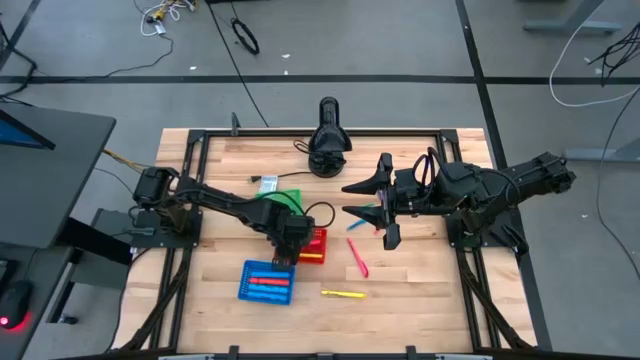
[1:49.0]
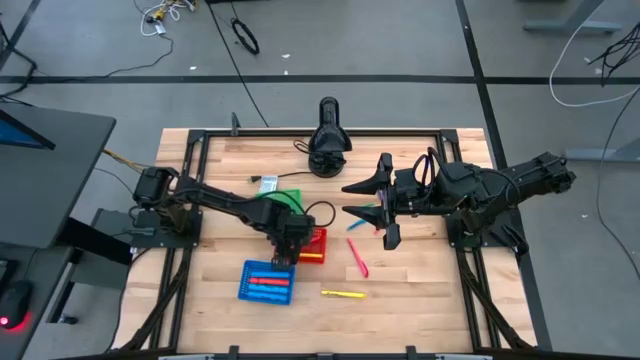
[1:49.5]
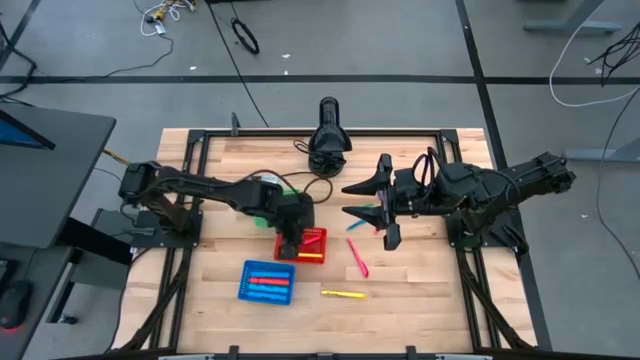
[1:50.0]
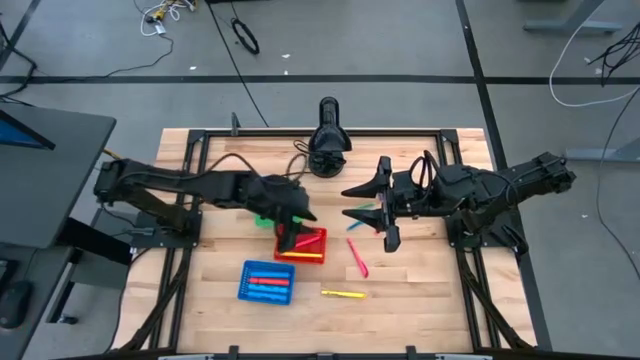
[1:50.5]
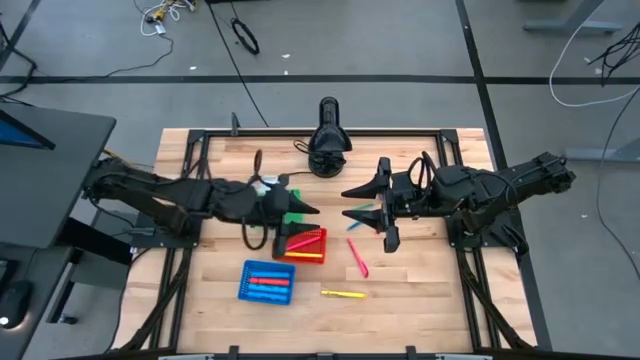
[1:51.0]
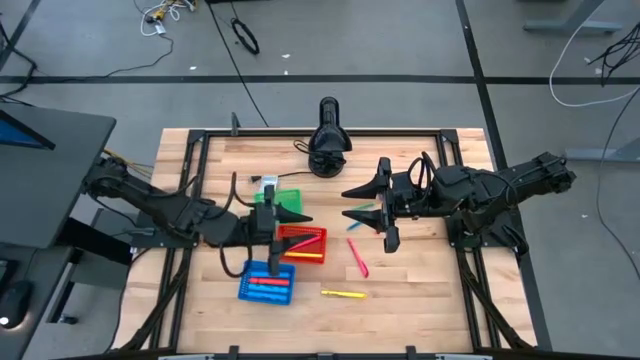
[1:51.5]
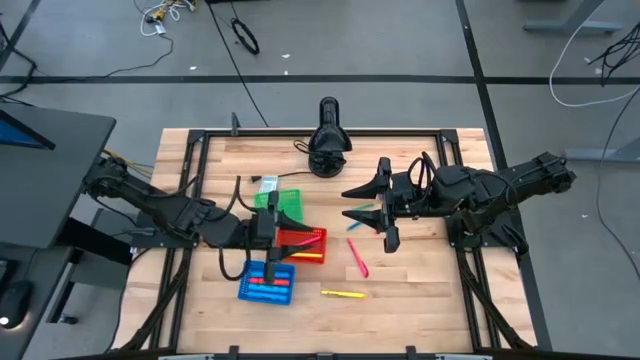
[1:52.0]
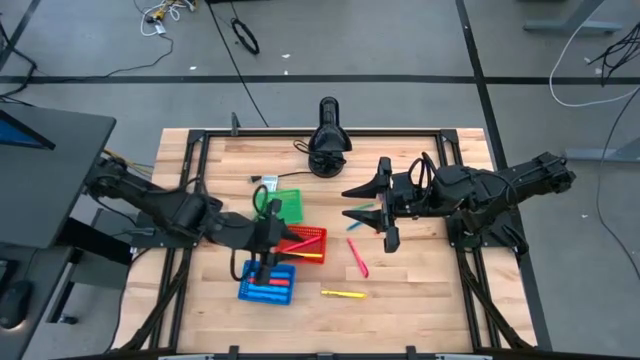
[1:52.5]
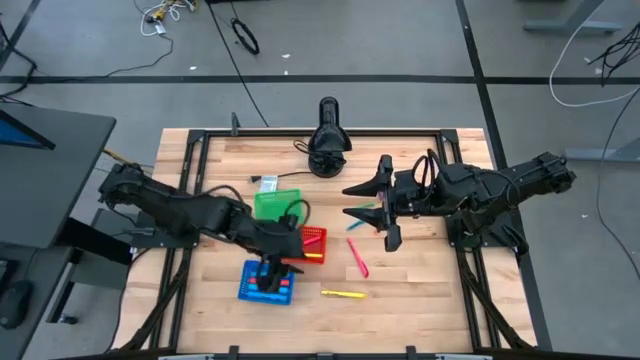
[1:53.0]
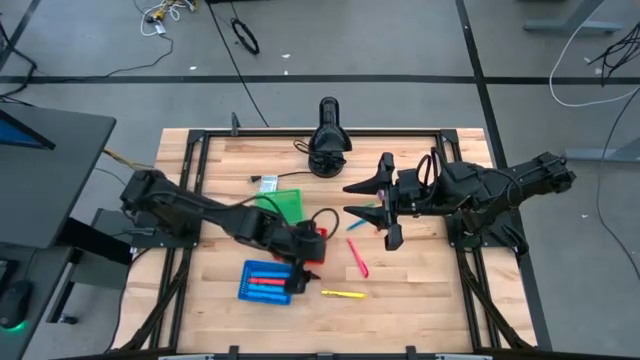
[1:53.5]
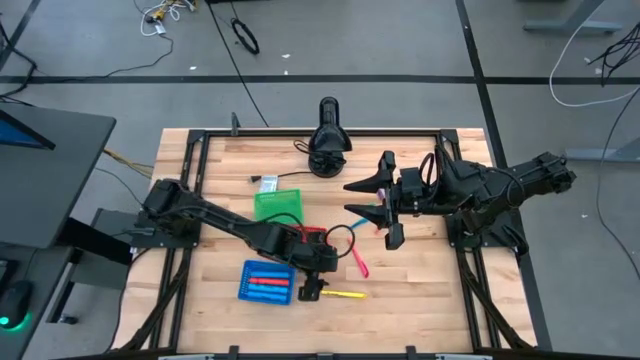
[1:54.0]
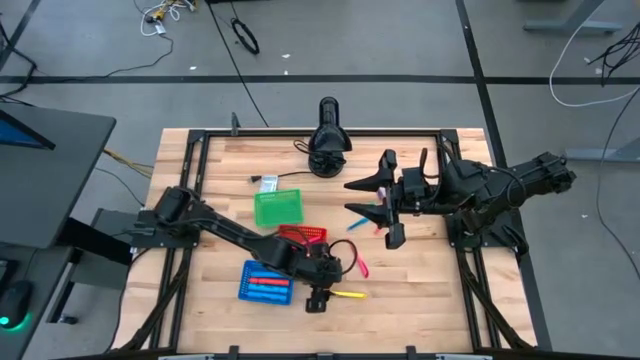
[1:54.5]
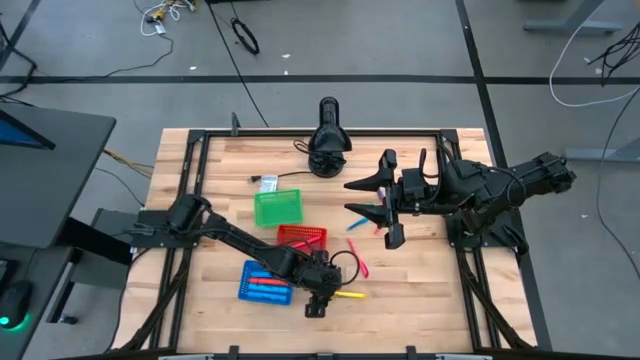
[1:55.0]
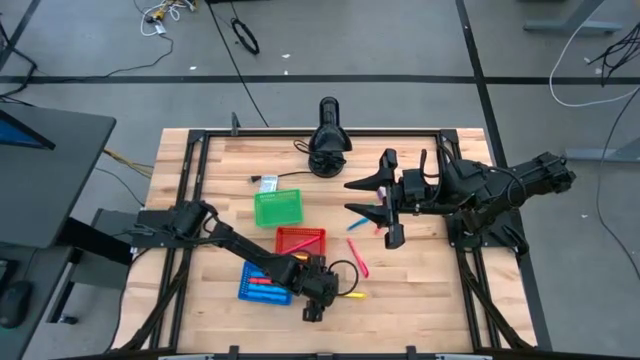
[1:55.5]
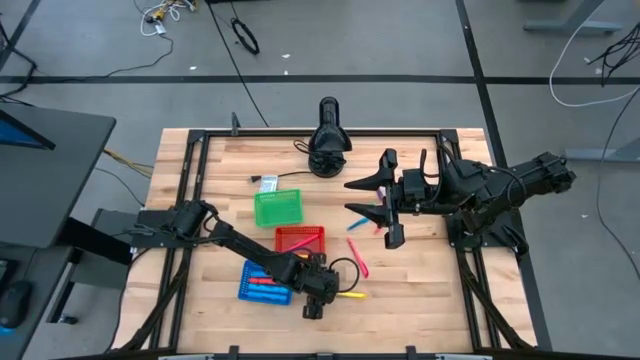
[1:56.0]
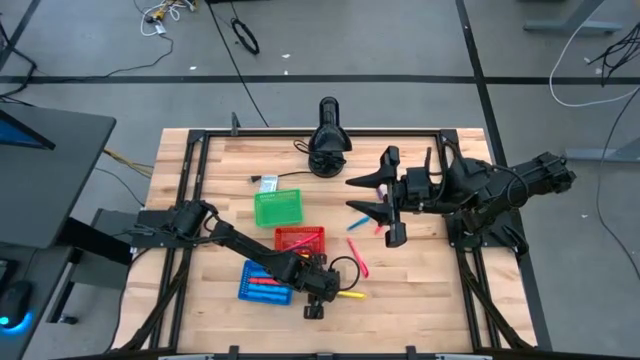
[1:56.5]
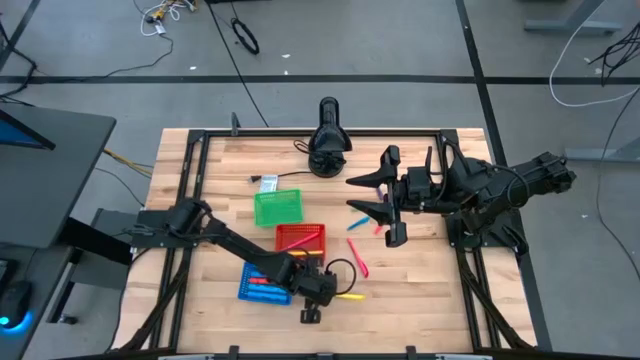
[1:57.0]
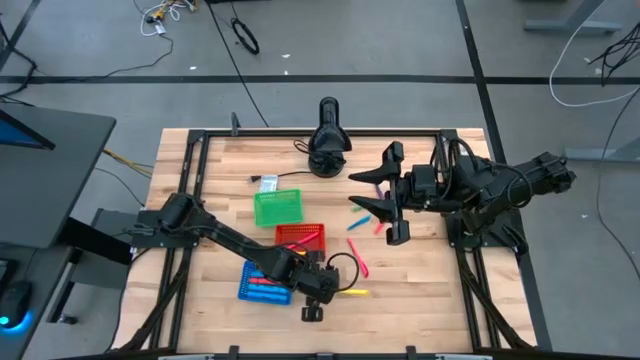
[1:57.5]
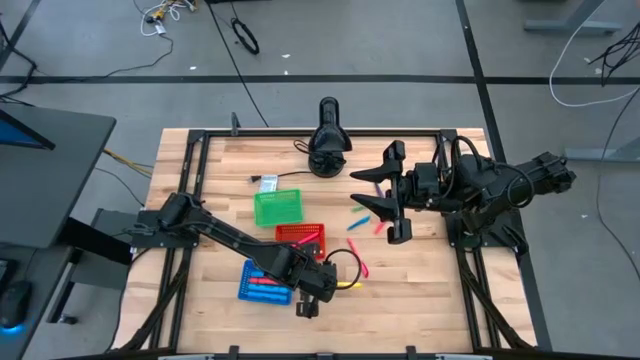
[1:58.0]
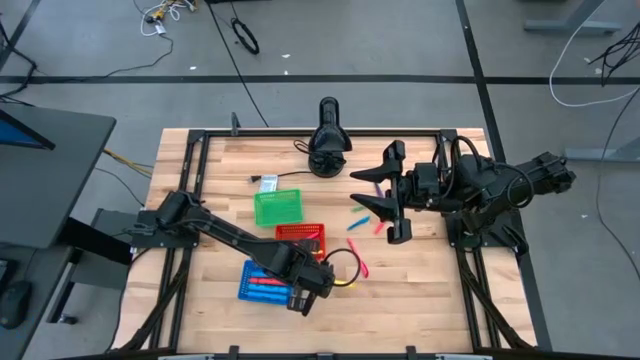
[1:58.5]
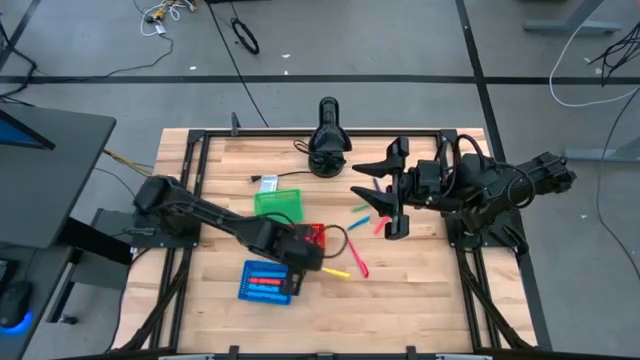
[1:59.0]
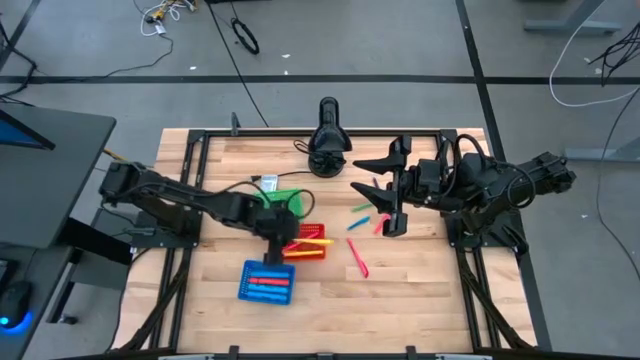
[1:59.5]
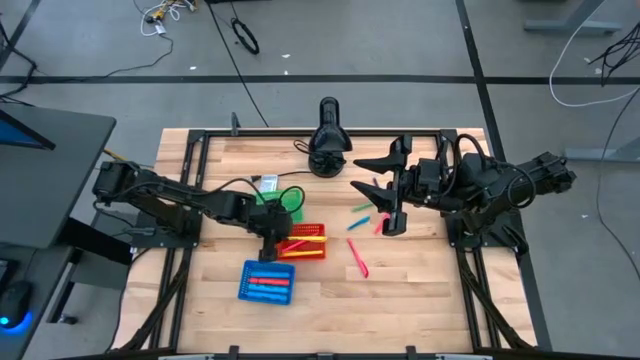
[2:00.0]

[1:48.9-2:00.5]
Task: Pick & Place Markers
Put the yellow marker pen into the red bin

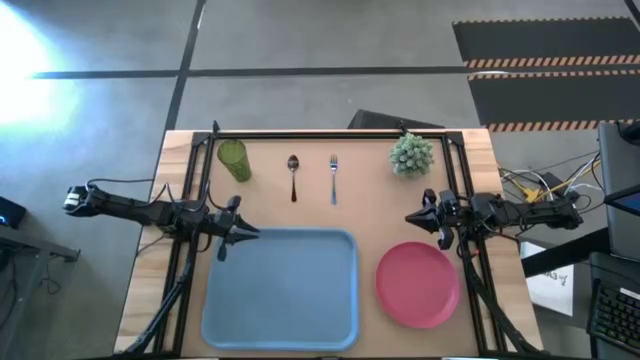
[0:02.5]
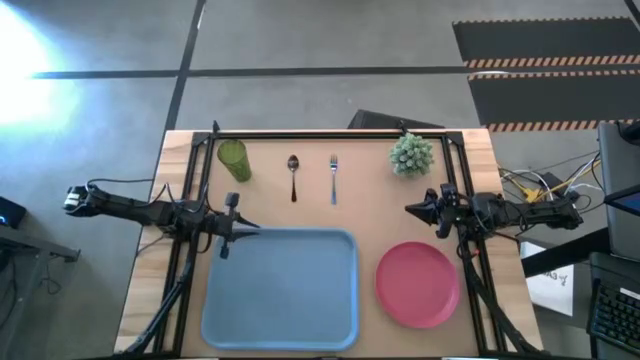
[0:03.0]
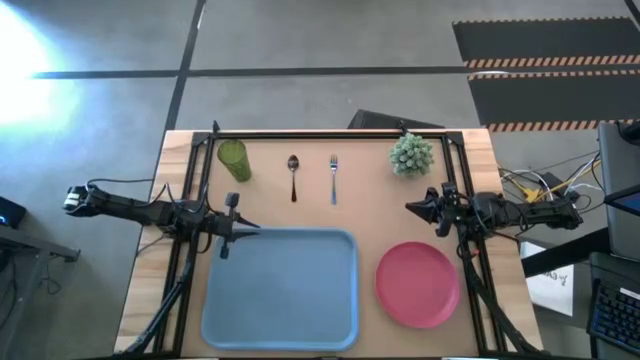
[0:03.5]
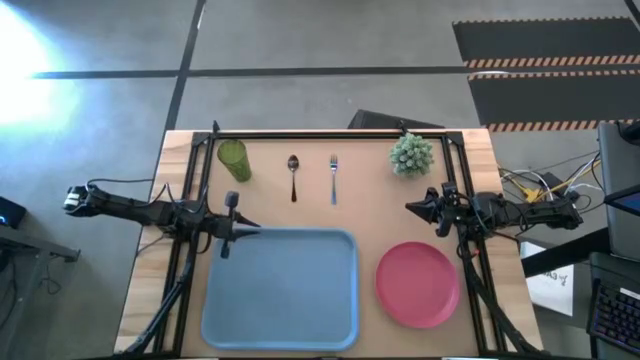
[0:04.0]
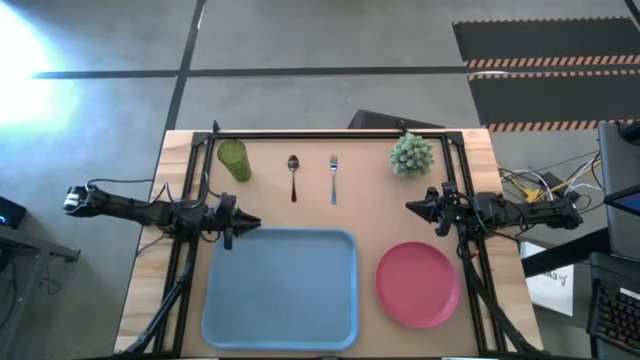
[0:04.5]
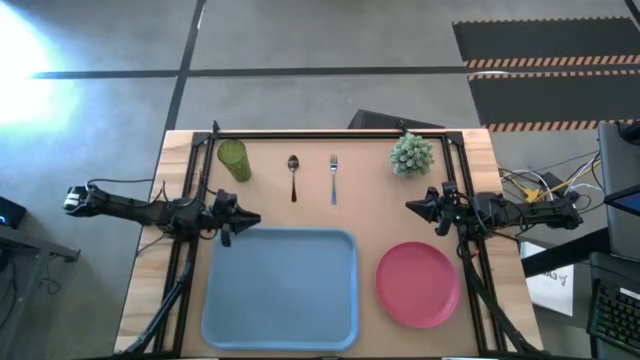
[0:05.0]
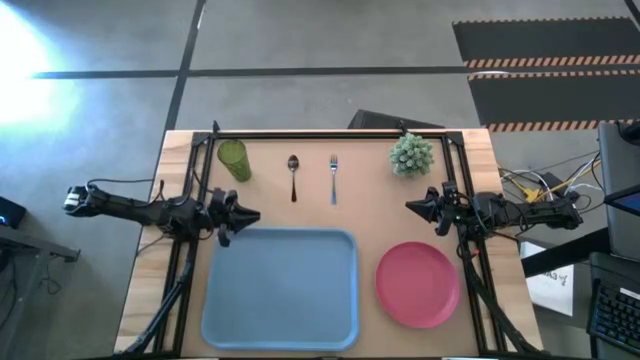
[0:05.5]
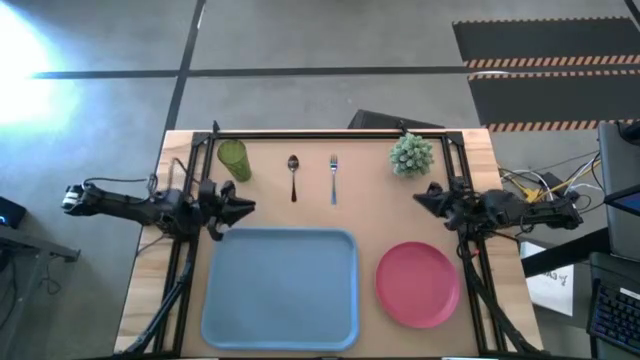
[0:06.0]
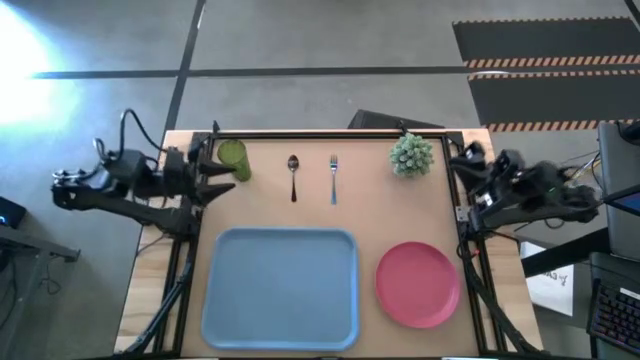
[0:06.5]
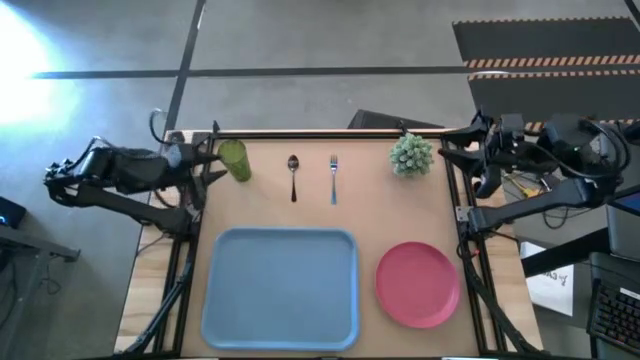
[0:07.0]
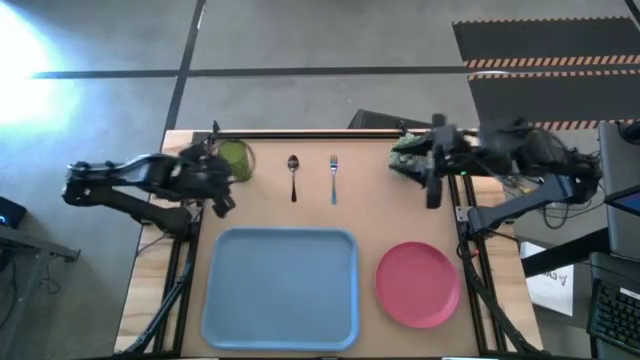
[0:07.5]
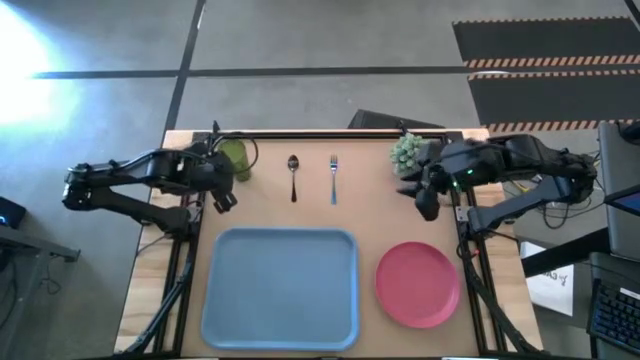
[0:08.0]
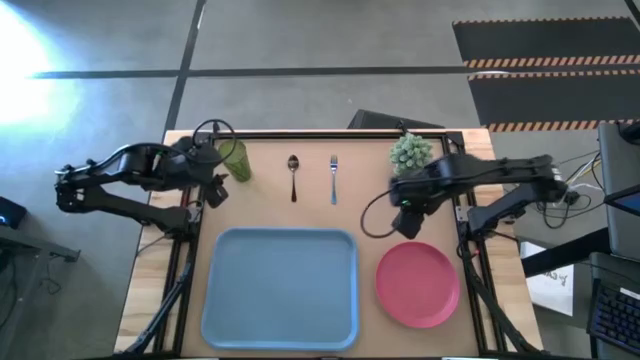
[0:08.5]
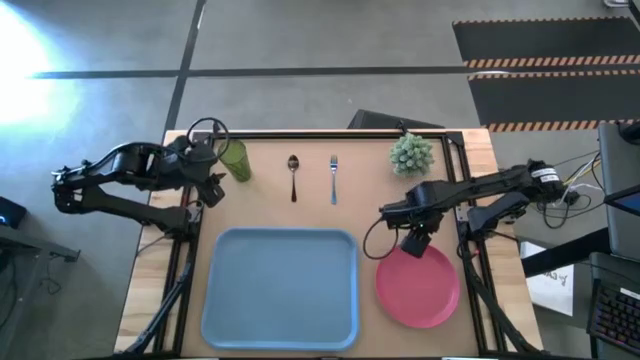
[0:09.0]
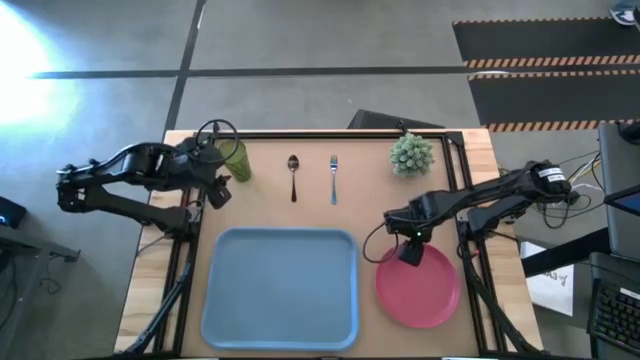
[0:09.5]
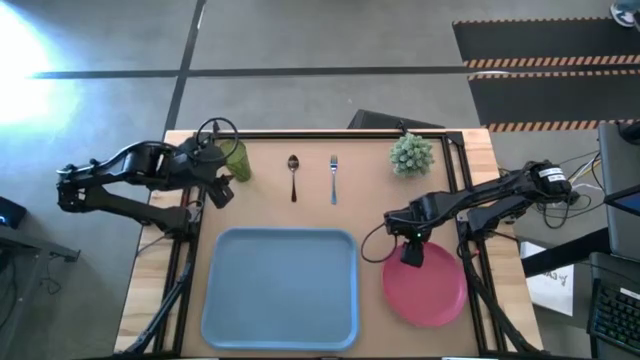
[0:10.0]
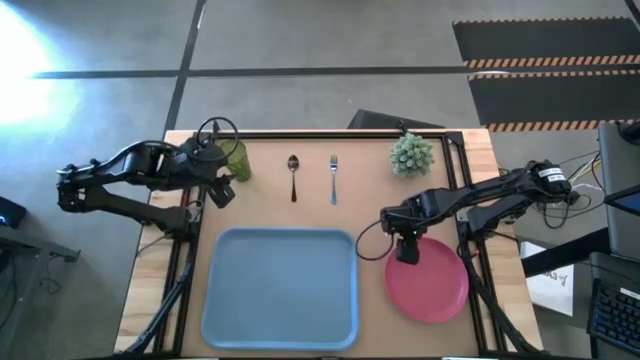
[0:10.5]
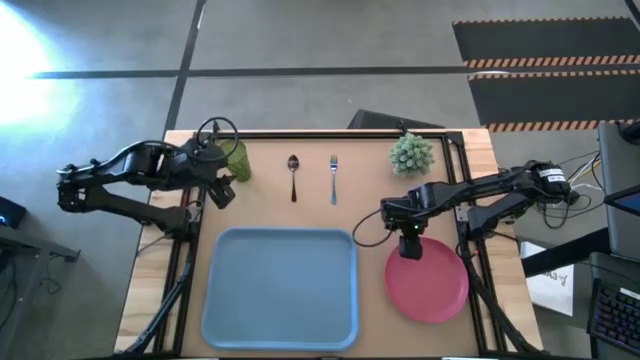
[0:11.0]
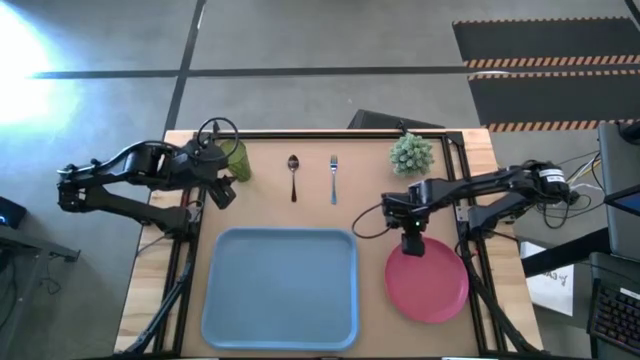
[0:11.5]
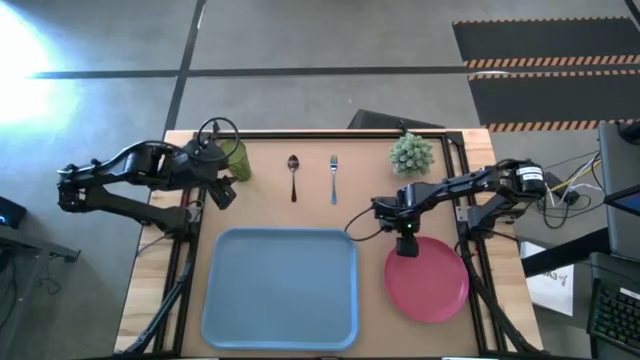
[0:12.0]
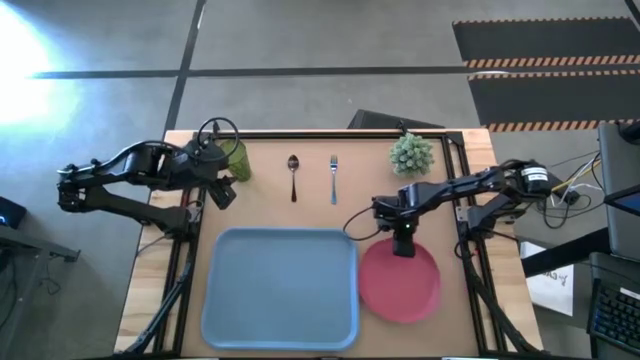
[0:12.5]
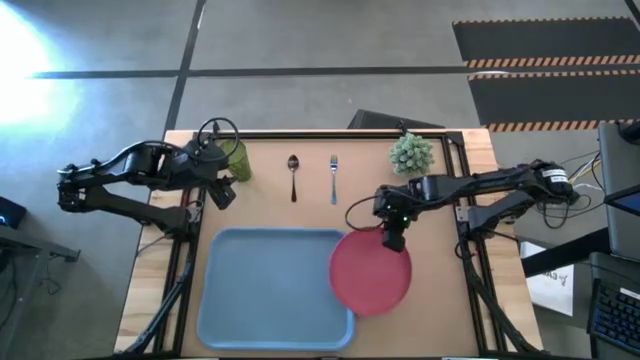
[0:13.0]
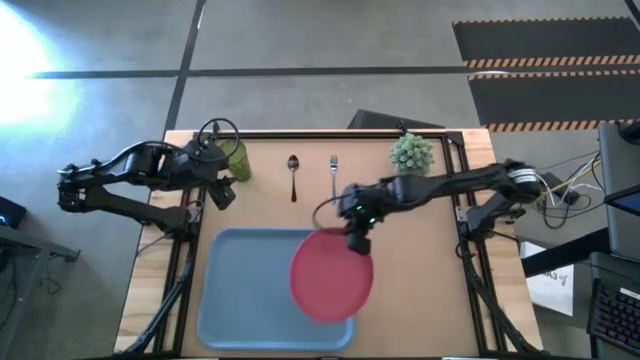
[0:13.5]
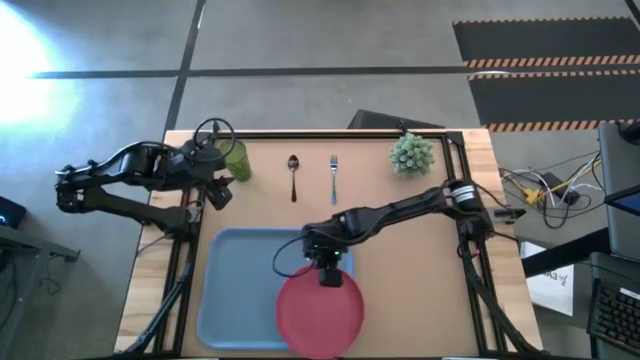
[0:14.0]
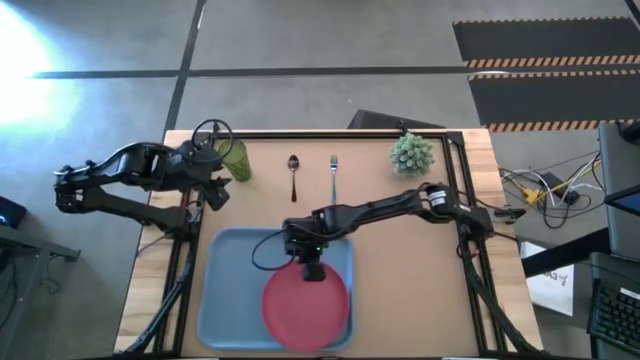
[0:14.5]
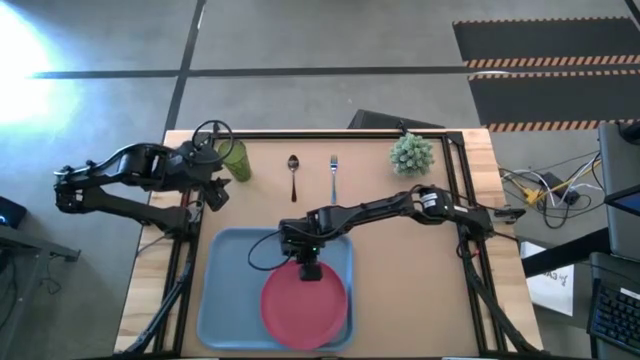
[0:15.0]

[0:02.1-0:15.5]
Task: Pick and place plate/cup/fork/spoon on tray
Put the pink plate on the blue serving tray
